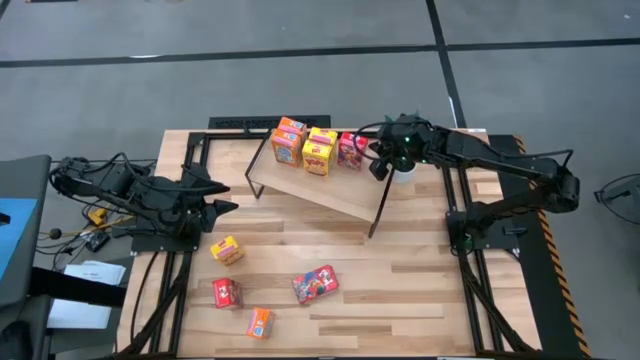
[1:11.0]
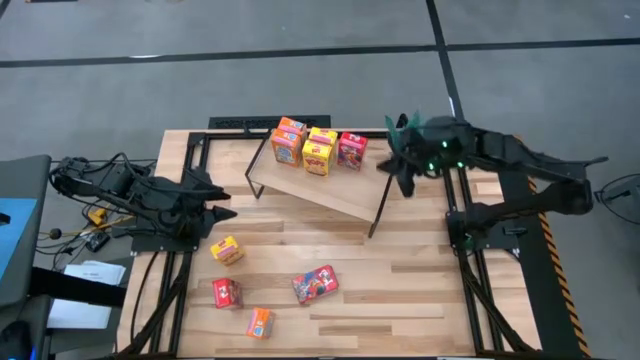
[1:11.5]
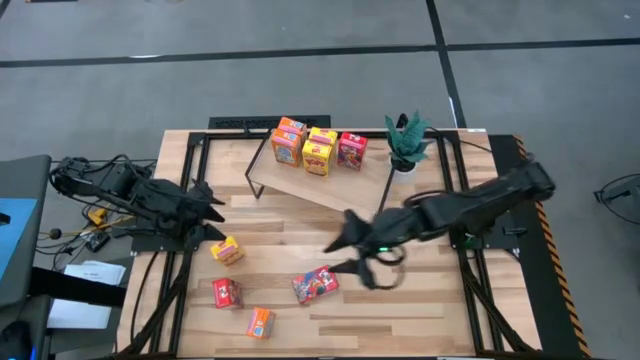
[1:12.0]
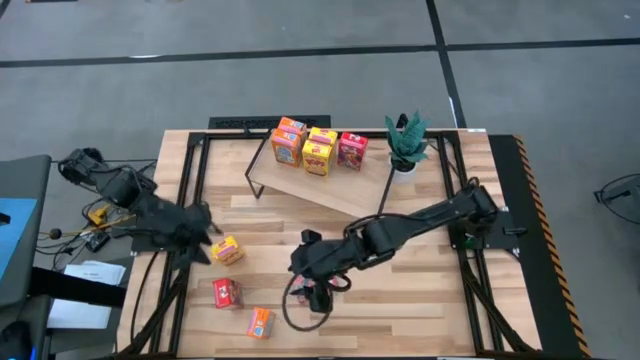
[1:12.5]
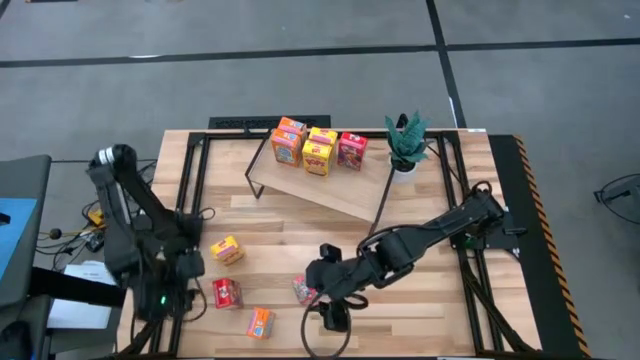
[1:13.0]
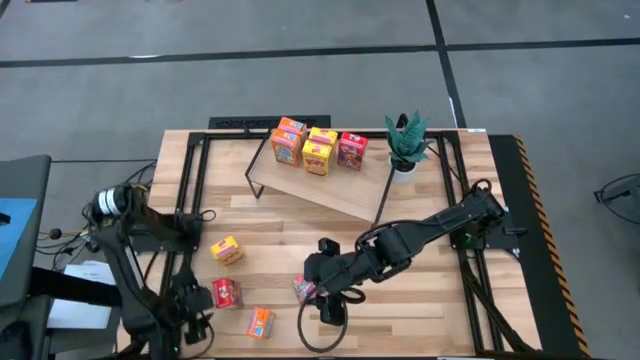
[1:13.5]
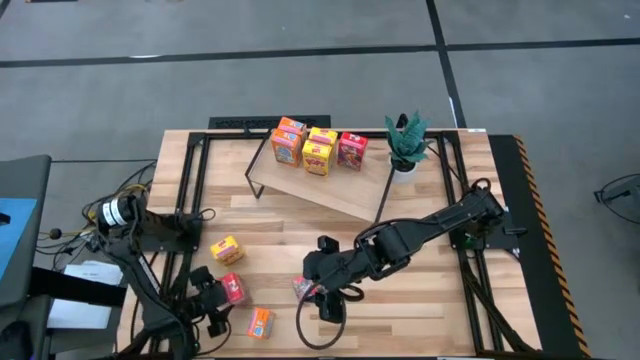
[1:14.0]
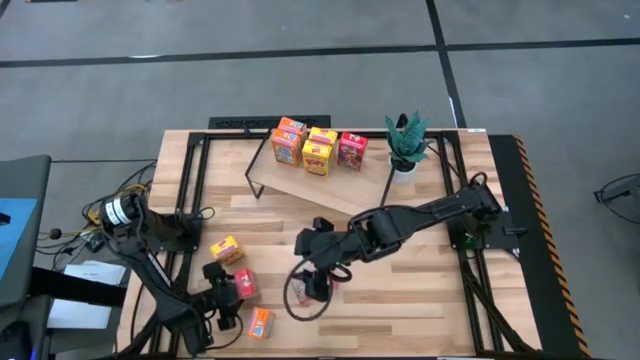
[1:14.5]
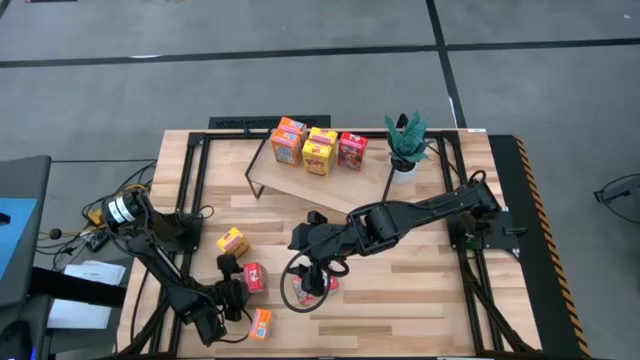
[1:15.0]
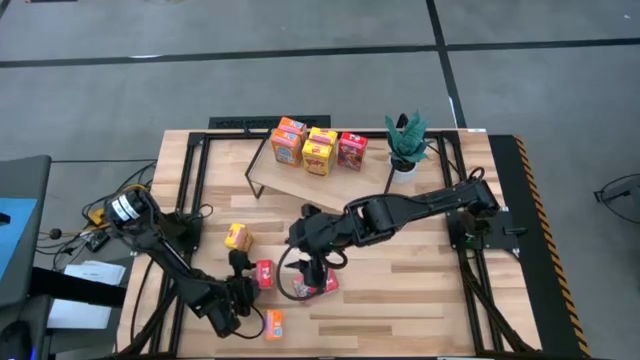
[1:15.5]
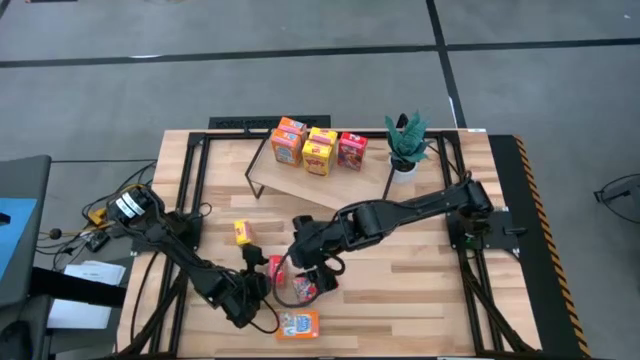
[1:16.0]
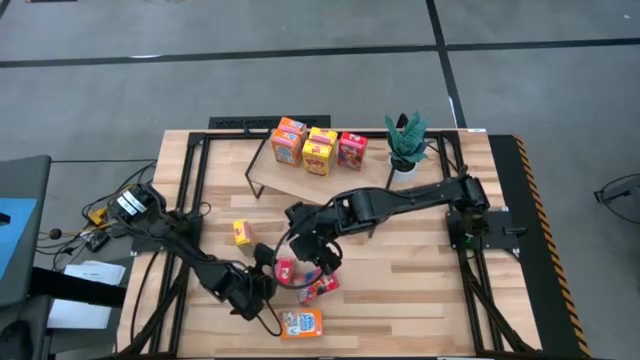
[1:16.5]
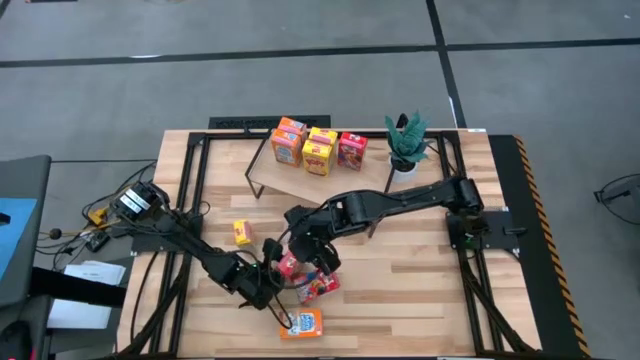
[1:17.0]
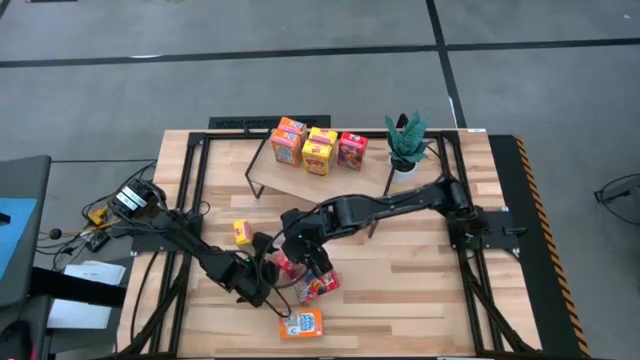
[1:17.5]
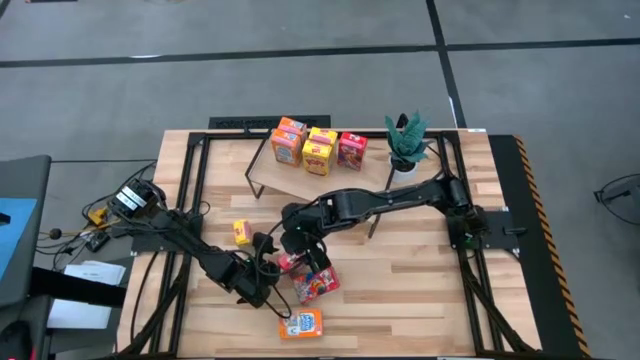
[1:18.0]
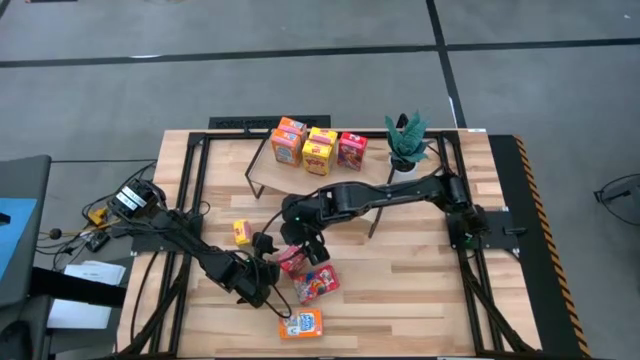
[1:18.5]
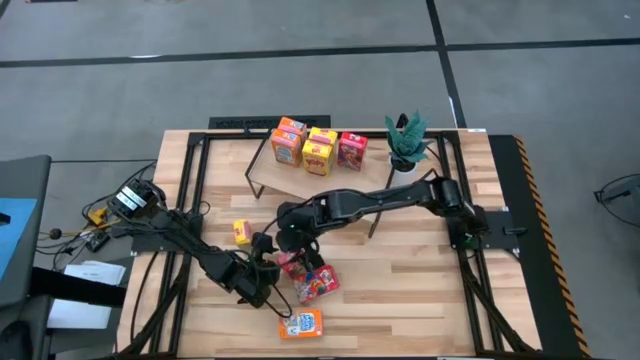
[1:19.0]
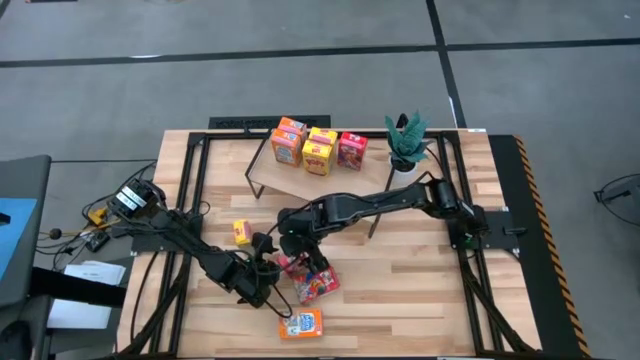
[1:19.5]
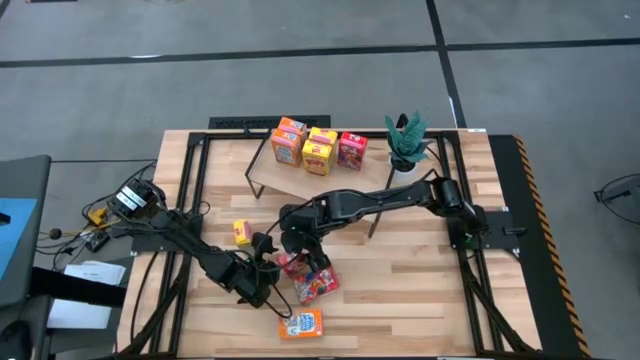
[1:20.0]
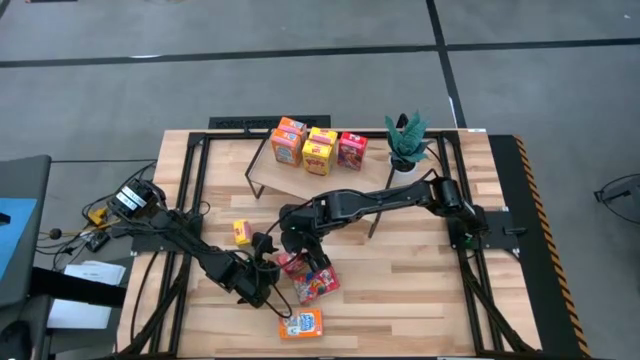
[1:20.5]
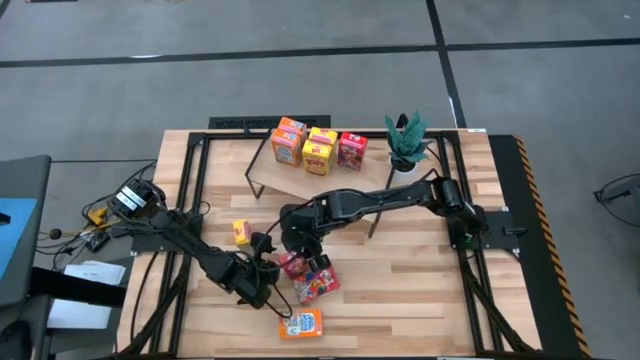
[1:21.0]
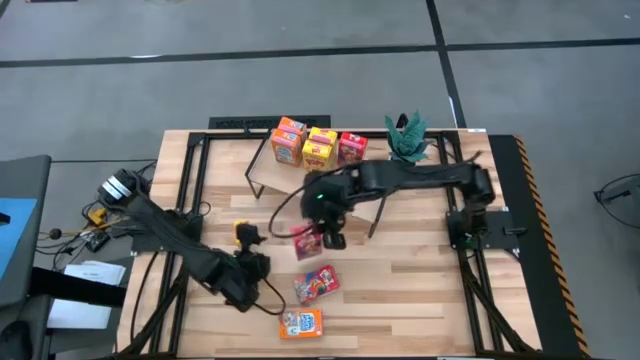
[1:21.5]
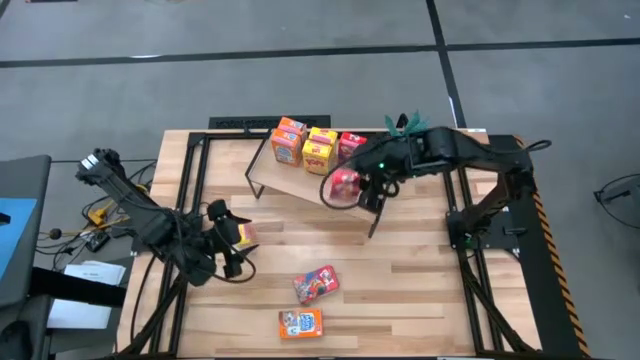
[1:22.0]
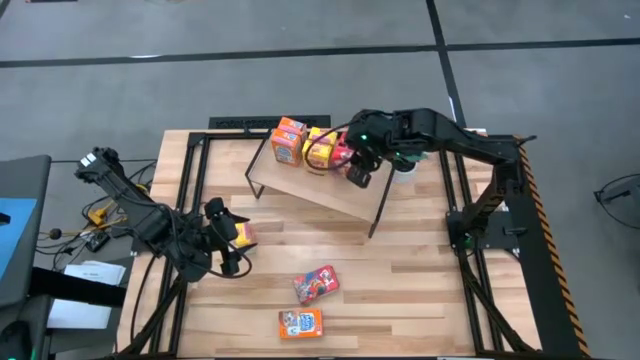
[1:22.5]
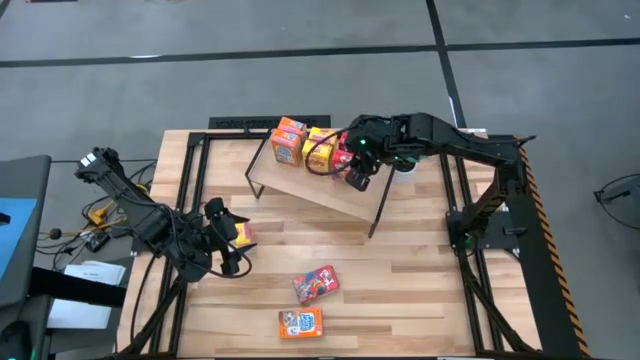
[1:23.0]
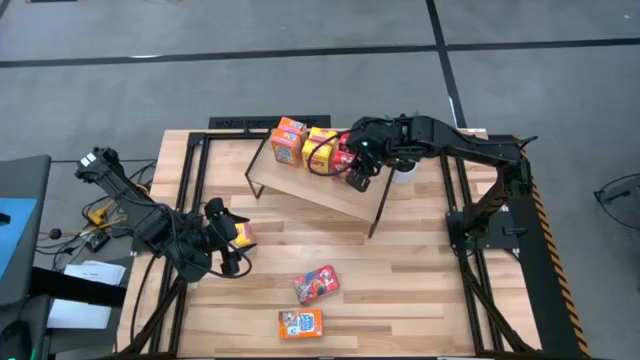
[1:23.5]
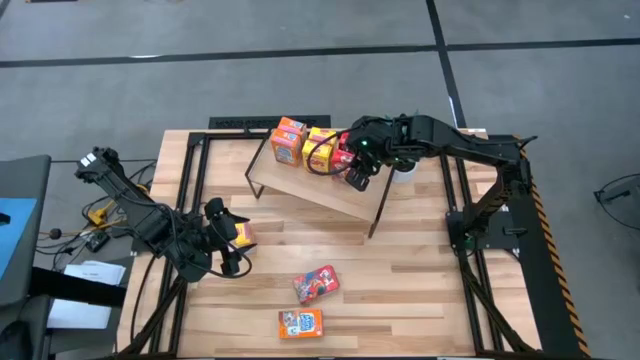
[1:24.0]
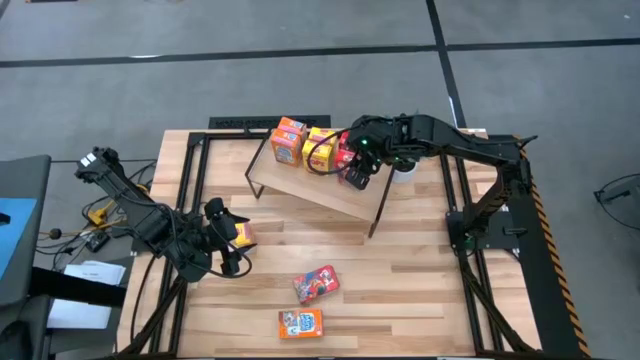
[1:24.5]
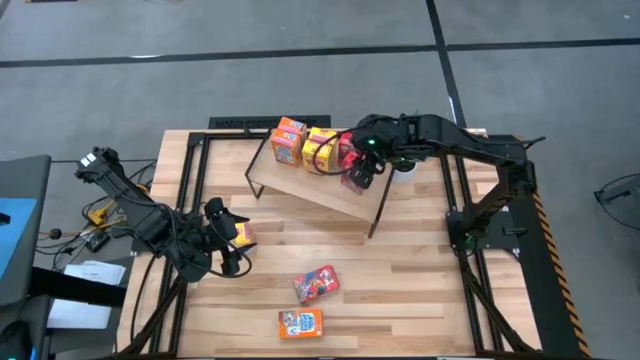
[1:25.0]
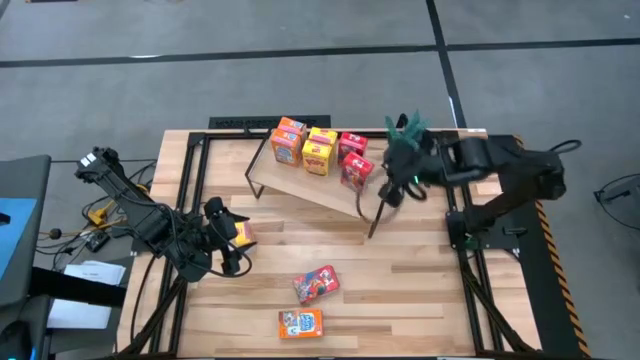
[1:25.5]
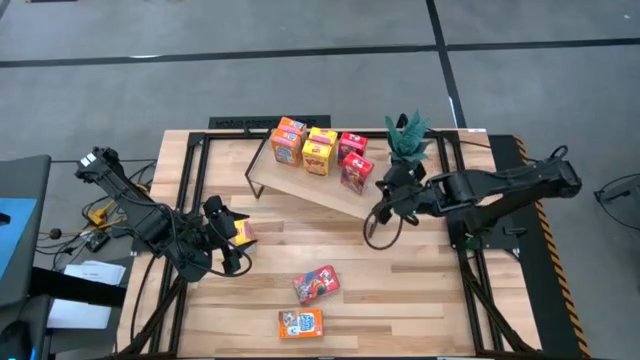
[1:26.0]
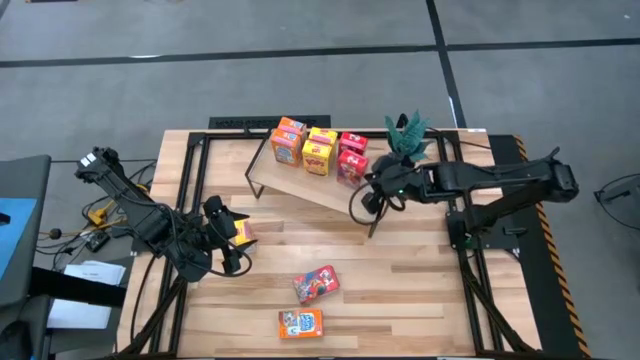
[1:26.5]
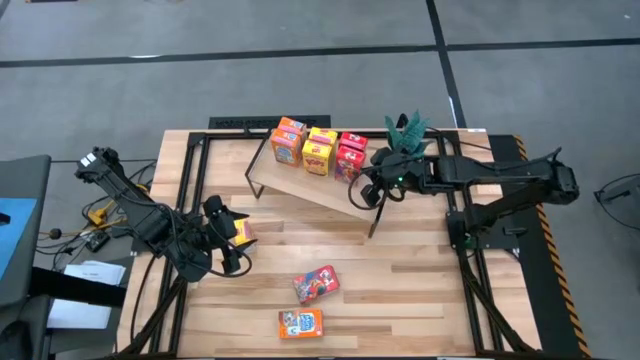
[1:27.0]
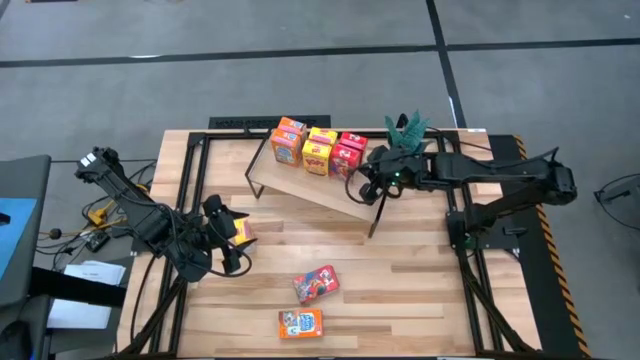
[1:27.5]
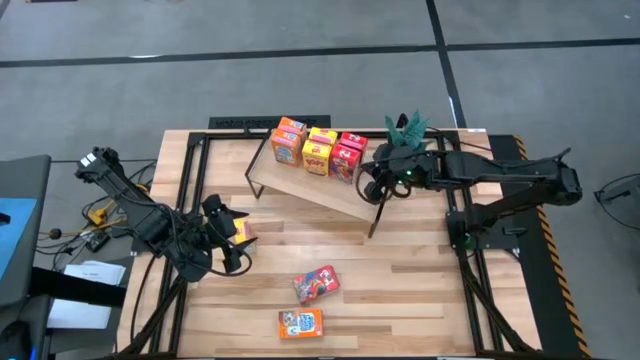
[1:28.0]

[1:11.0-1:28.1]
Task: Stack cereal on shelf
Put the left red cereal box aligned with the other red cereal box on the shelf

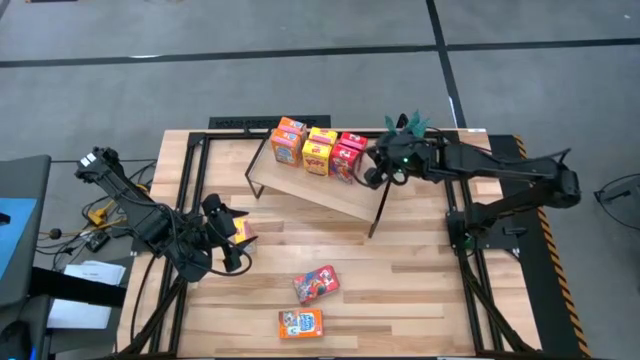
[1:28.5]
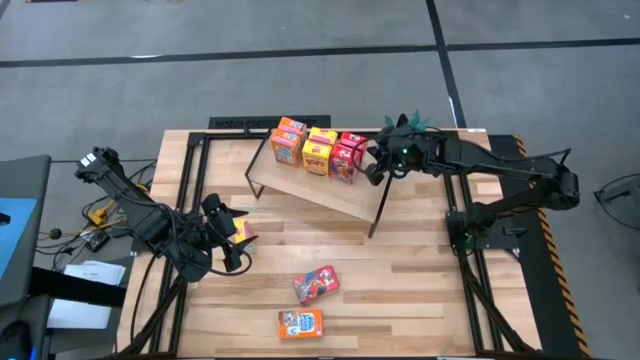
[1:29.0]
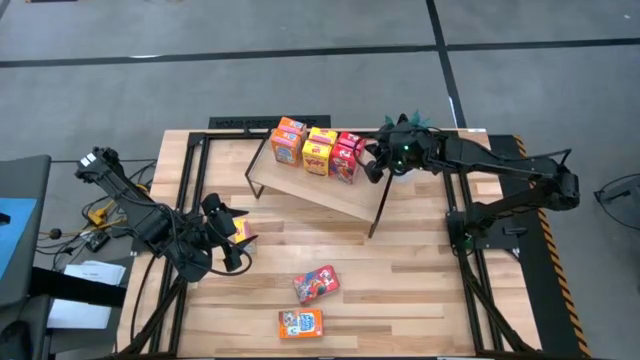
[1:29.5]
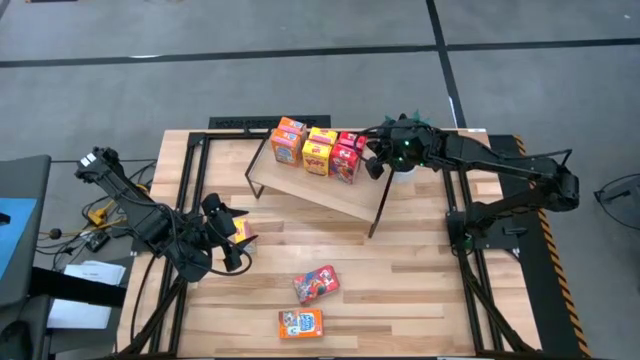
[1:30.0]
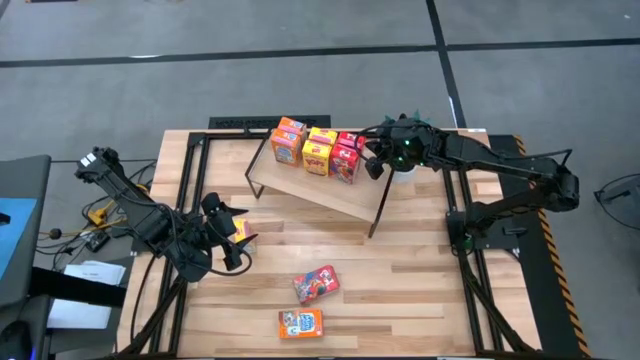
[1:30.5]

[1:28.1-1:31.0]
Adjust the red cereal box on the shelf

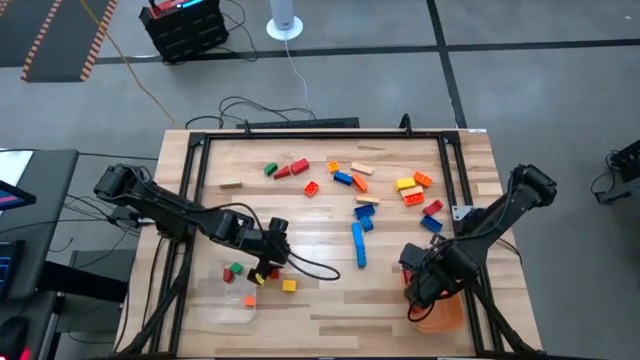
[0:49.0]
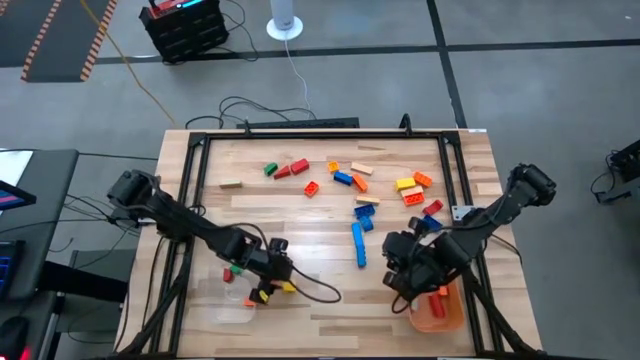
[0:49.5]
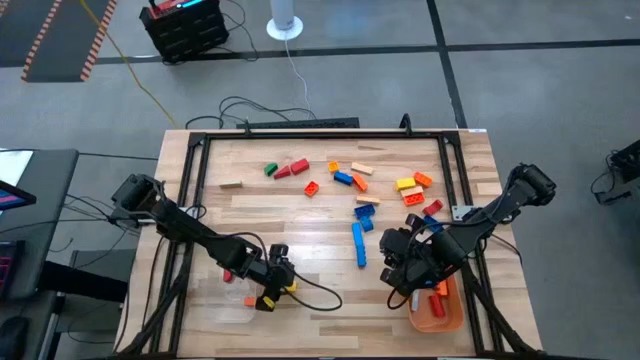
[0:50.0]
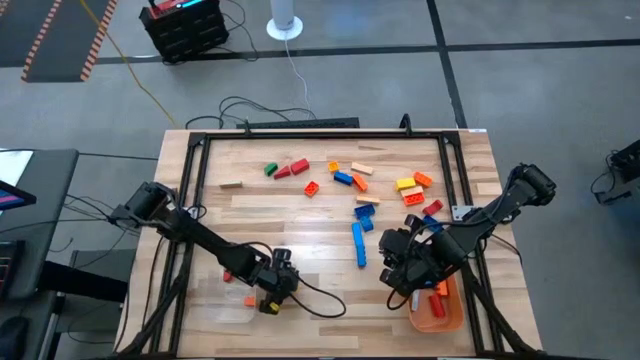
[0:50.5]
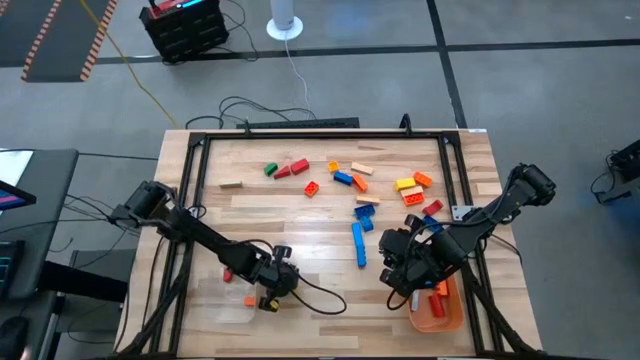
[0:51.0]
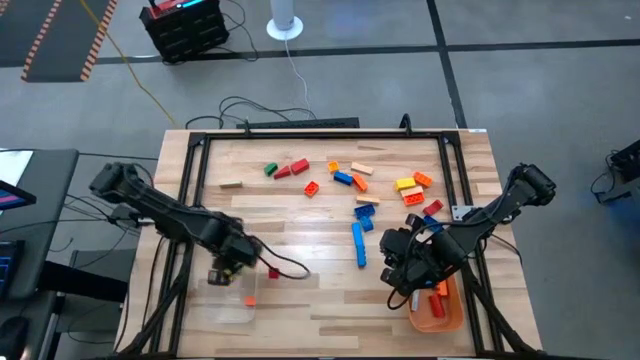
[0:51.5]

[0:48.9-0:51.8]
Task: Sort blocks by size
Put the small yellow block into the transparent bin
